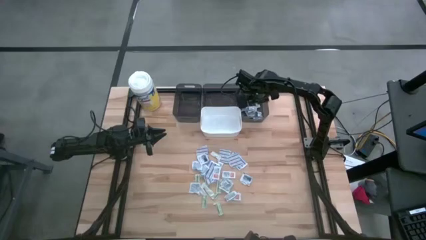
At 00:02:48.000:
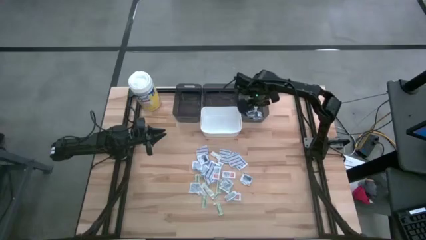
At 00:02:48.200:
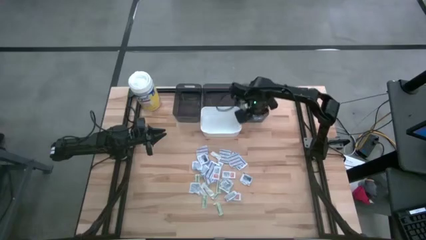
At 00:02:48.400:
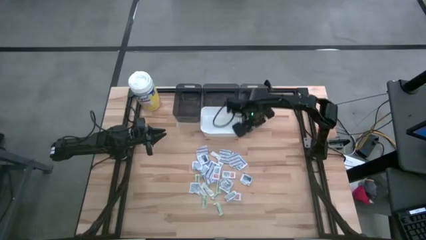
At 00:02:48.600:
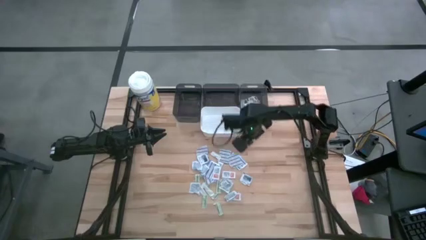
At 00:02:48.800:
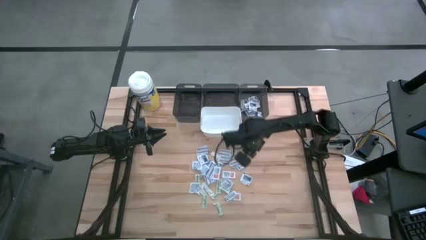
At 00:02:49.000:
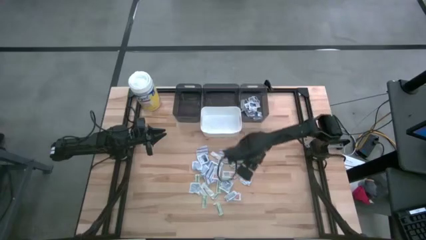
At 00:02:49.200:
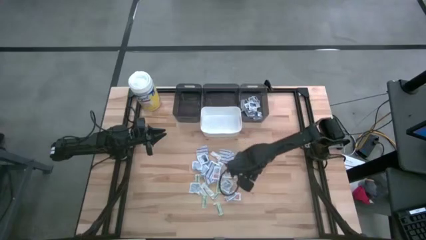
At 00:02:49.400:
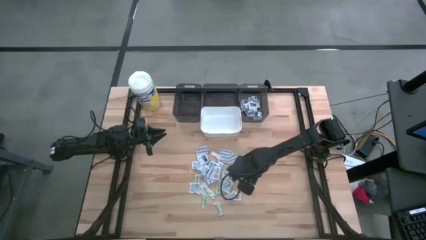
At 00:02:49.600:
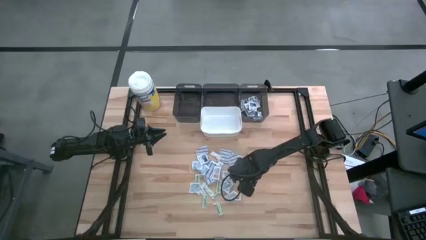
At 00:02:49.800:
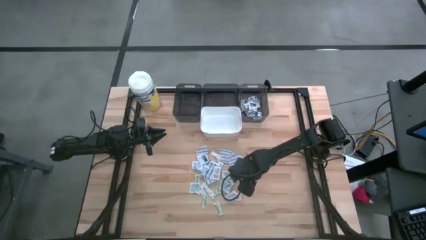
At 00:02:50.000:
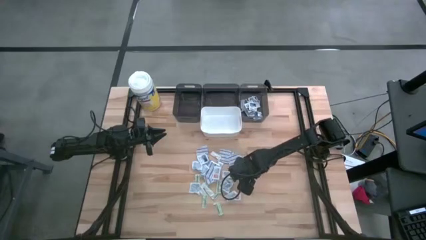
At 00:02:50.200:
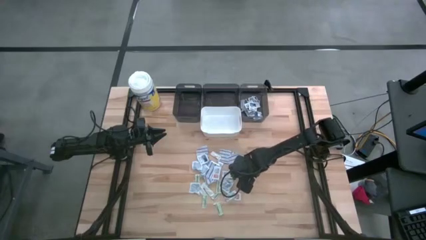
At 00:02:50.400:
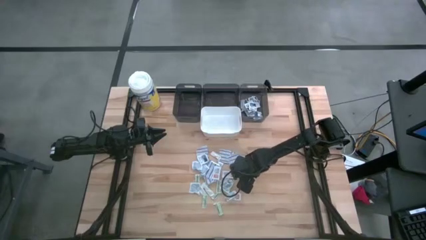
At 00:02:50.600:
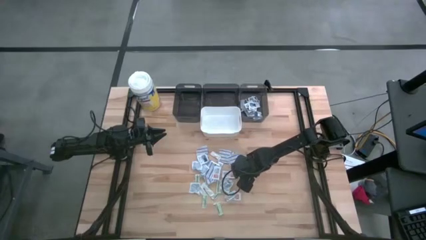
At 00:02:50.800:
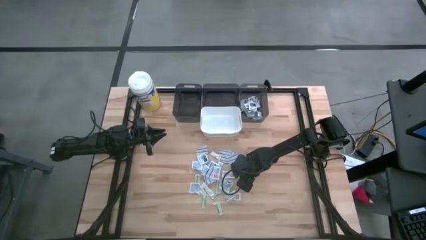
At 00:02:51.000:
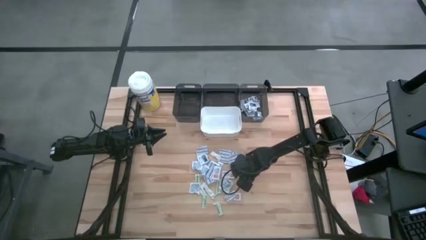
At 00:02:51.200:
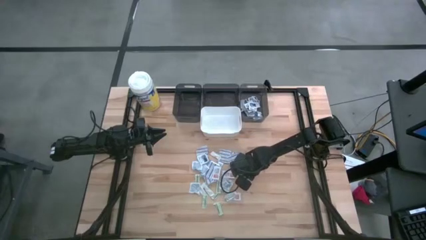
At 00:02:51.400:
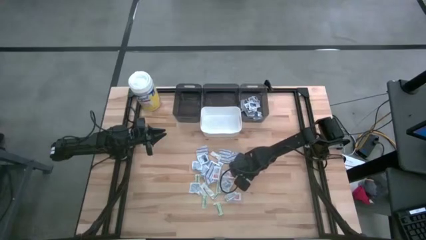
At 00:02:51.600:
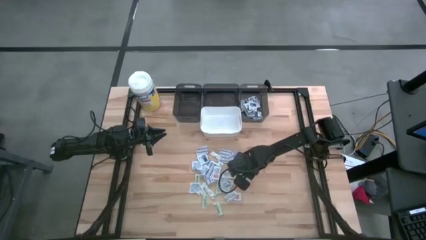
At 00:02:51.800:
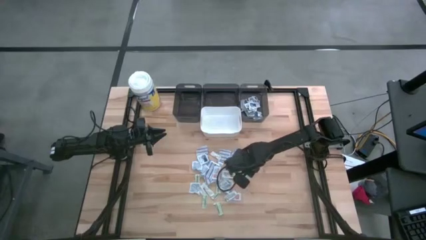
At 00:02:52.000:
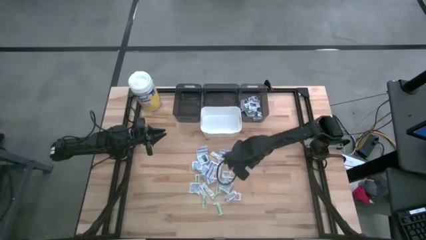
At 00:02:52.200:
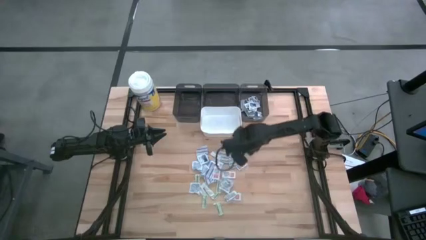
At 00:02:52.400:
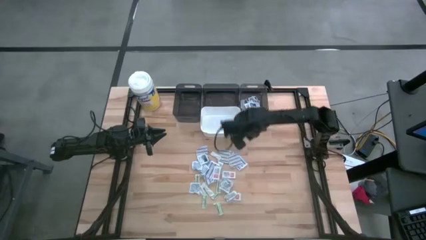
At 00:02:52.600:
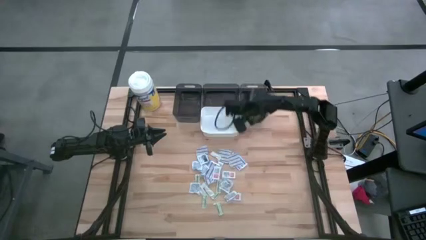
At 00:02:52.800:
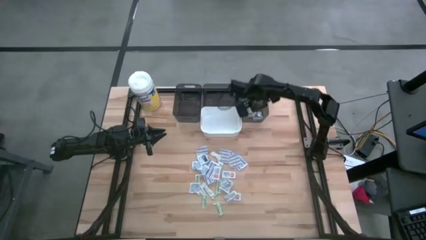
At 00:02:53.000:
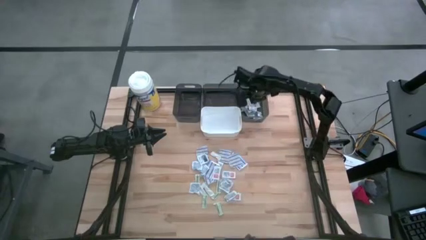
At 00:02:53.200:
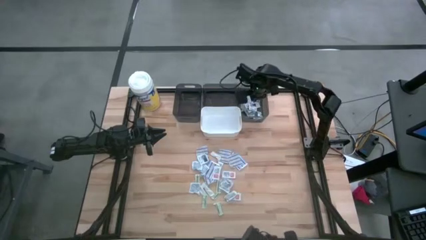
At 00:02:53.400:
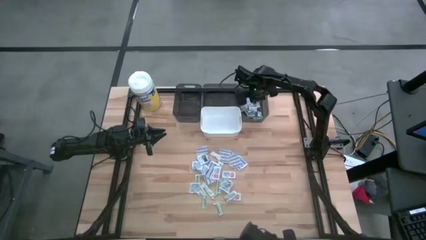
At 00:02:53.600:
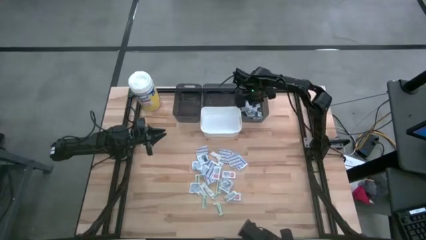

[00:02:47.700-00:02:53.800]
Task: Pick & Place First Aid Supplies
Put the blue alcohol pad into the right black bin

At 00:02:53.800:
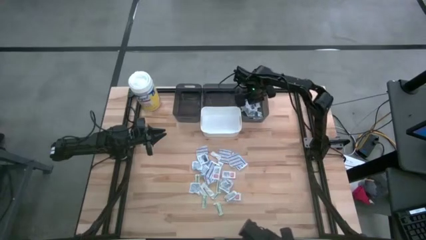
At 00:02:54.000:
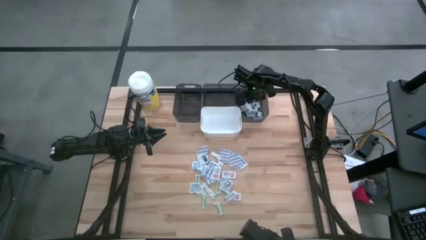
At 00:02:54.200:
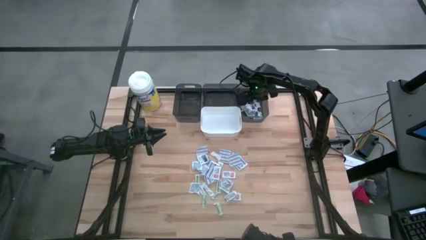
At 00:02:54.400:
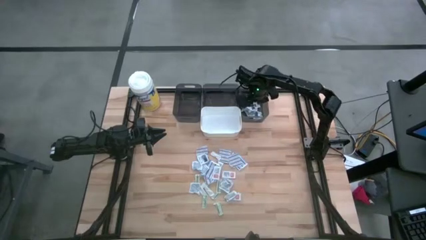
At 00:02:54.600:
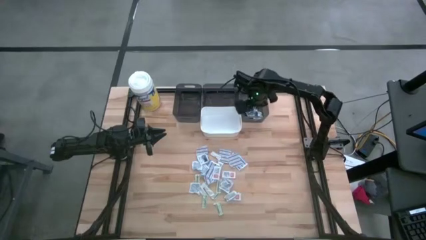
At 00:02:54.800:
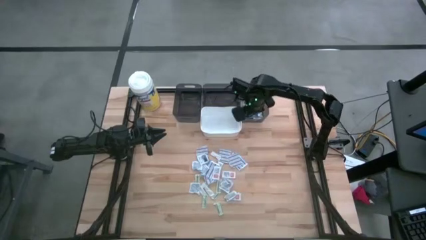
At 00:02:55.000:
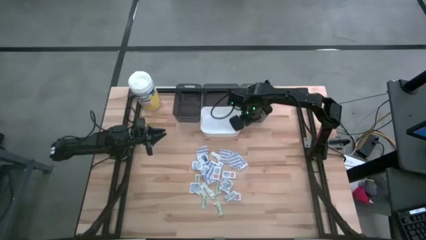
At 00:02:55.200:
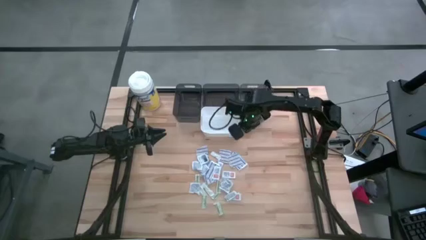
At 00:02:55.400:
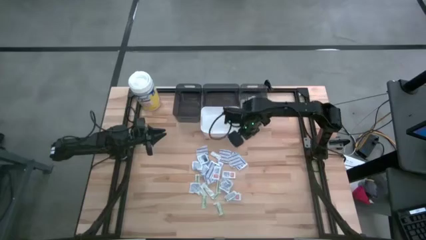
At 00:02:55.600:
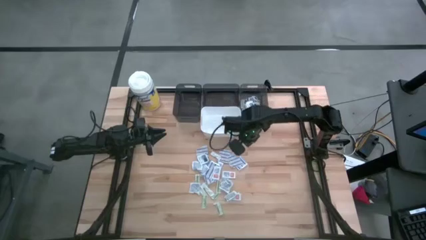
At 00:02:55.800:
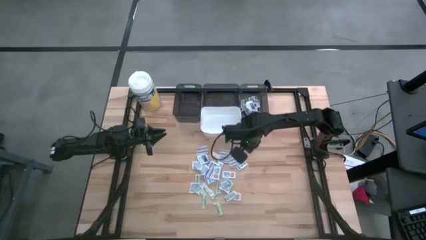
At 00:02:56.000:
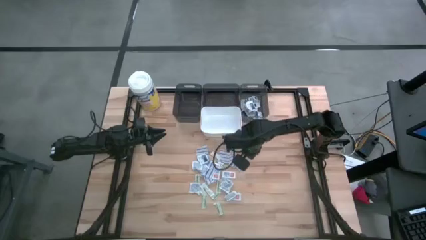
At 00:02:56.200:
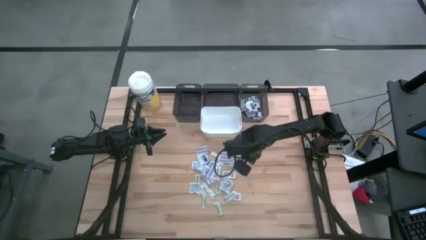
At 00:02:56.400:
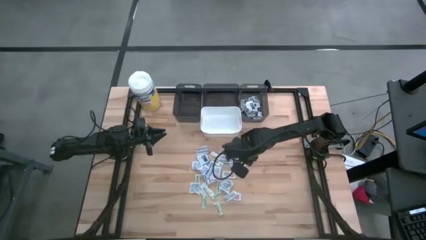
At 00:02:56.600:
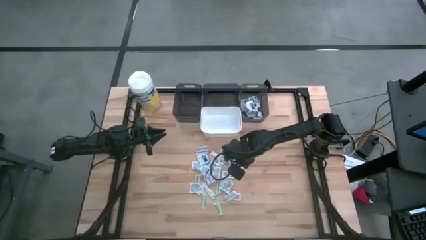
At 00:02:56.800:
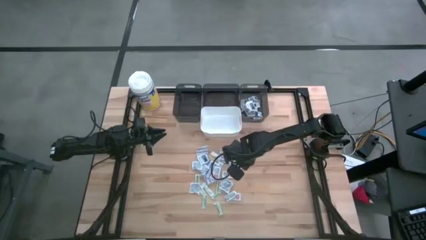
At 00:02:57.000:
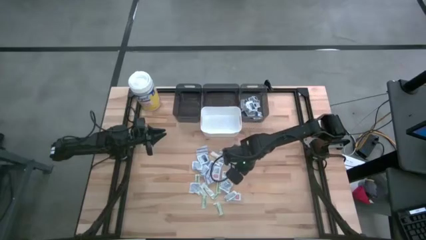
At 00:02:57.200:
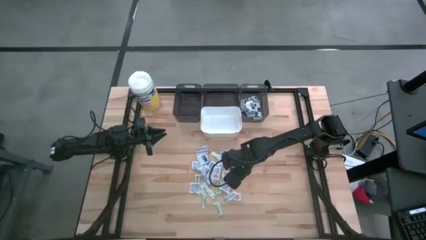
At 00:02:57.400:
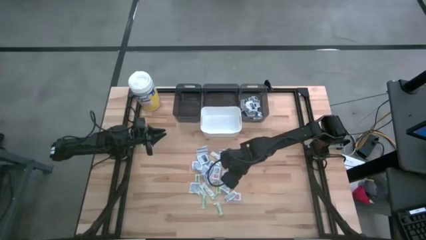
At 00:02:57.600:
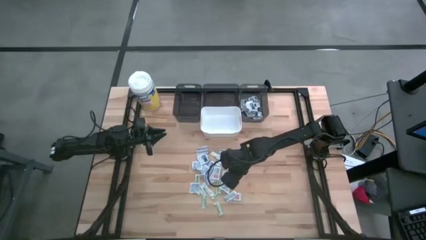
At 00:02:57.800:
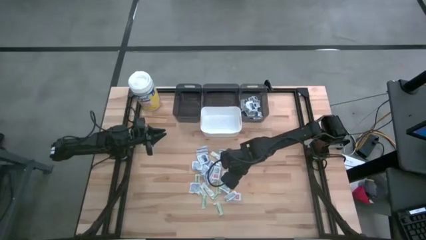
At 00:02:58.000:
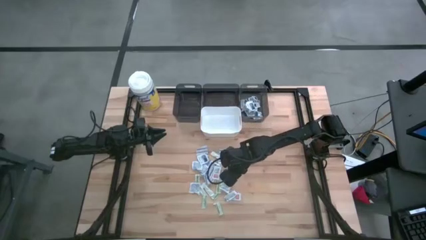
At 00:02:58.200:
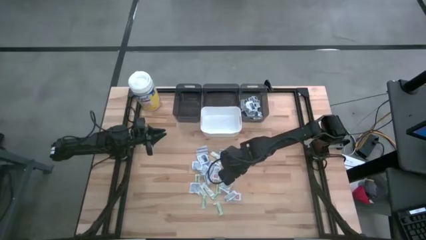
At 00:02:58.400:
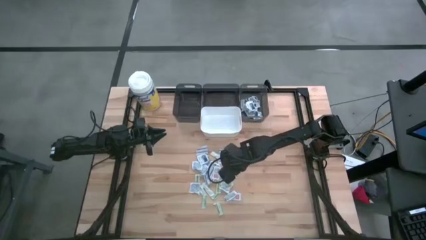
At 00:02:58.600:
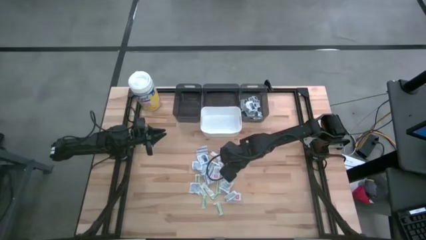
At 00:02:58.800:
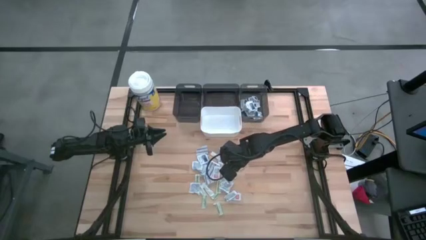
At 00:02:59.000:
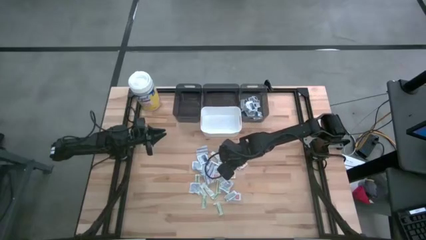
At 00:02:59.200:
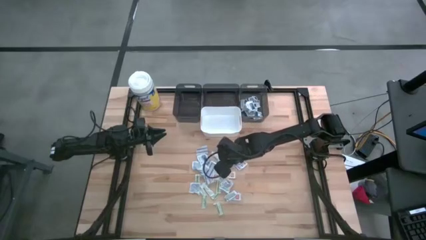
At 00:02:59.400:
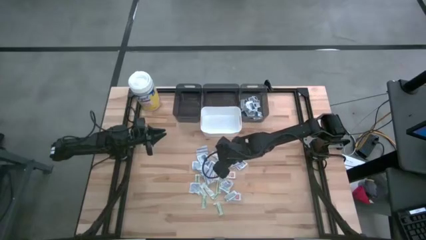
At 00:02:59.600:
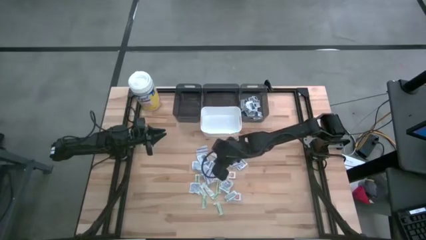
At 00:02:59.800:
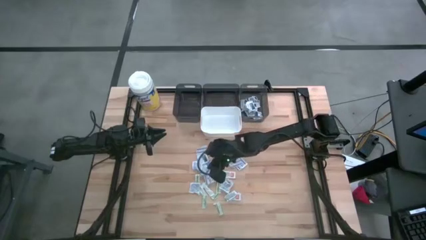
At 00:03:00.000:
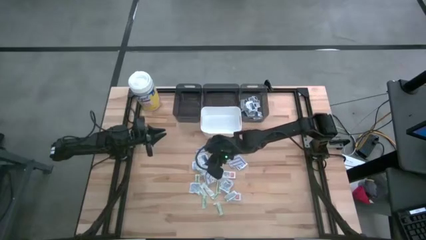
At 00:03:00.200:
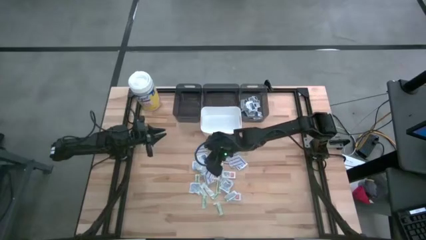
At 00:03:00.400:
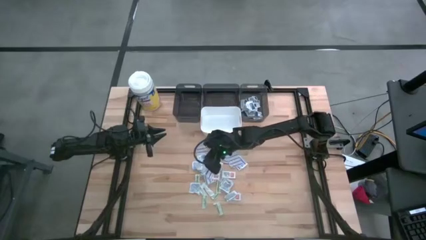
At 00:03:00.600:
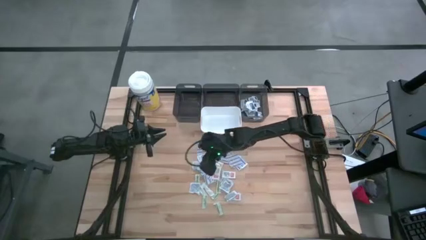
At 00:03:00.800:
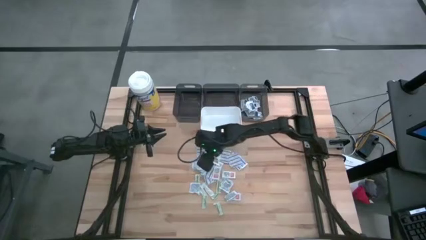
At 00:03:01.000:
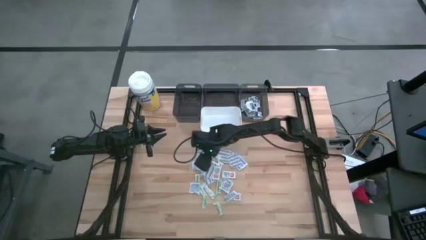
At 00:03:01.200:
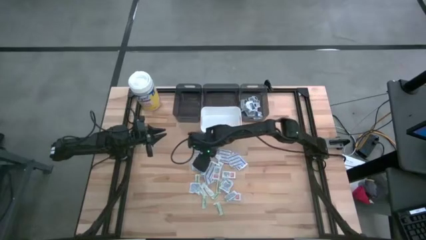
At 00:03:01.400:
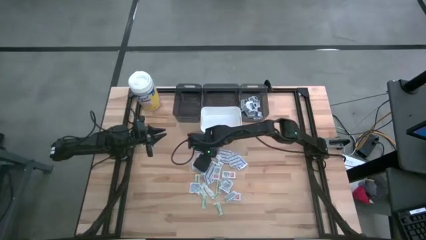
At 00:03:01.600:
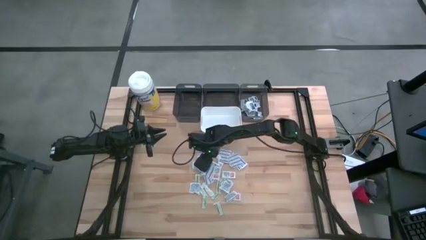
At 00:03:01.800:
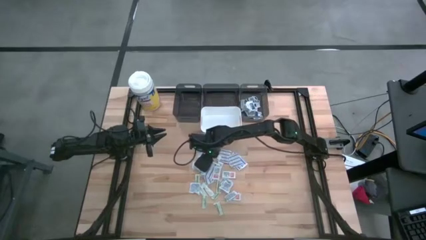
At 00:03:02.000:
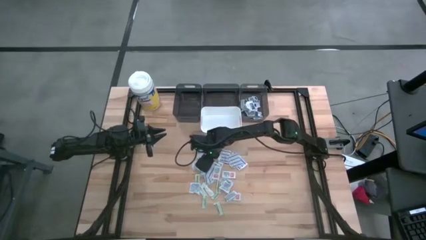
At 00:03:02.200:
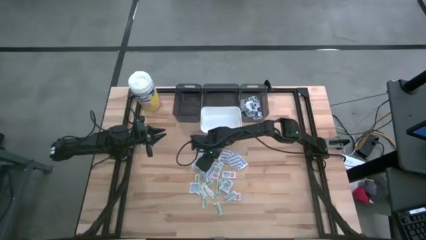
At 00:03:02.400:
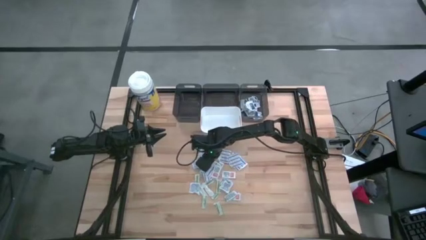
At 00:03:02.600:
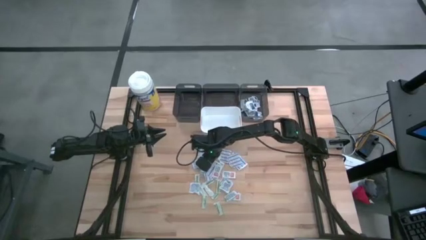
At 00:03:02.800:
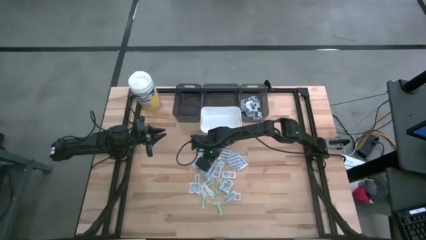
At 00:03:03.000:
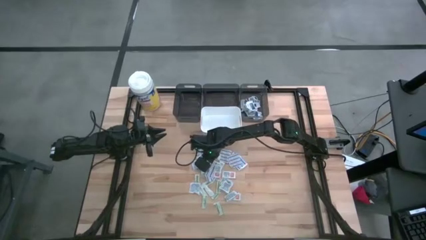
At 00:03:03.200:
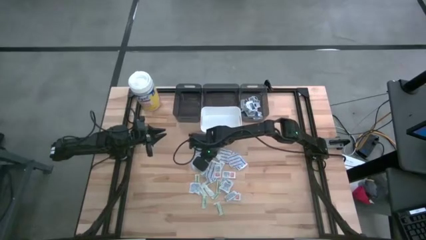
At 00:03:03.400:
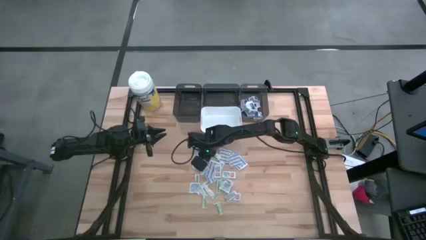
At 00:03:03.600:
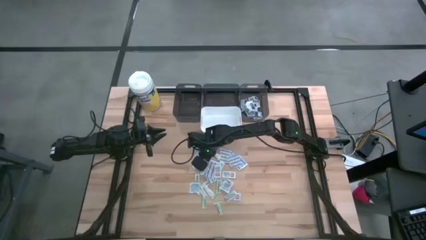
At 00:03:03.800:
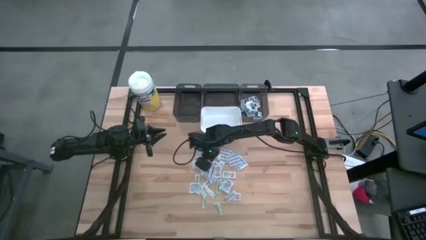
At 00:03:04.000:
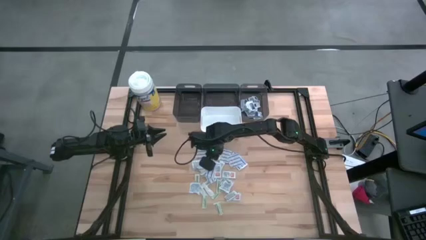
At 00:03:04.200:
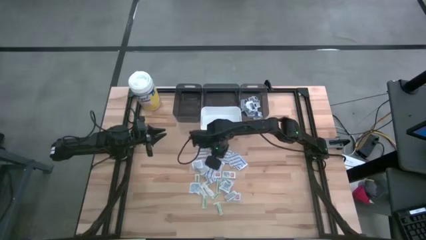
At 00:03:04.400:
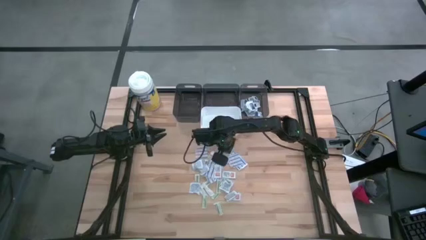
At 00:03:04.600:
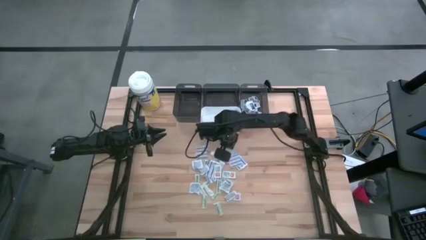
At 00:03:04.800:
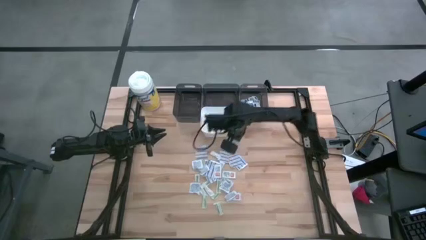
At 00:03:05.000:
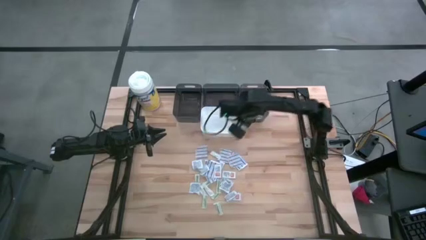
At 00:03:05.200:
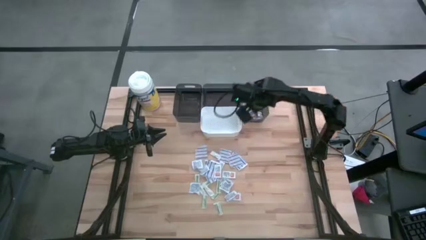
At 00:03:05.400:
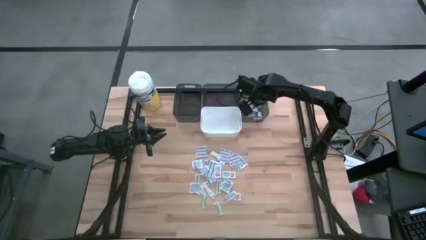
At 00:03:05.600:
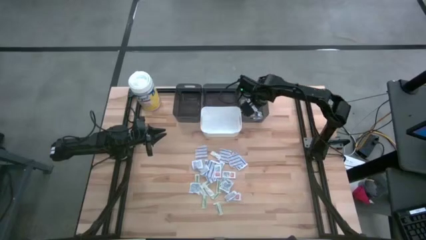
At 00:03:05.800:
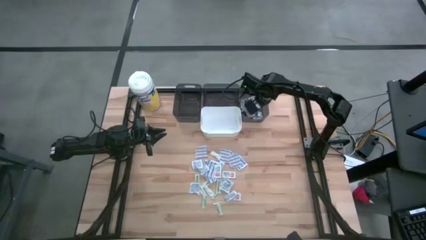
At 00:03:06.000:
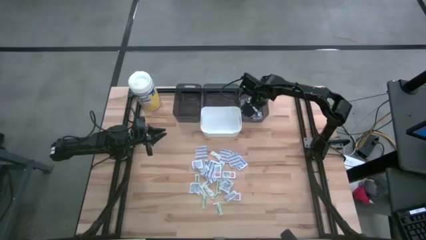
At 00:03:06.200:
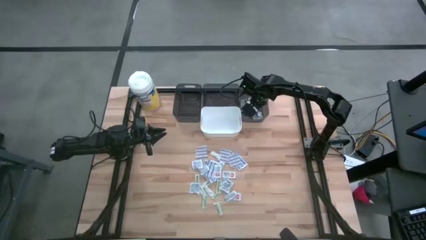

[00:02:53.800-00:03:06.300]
Put the blue alcohol pad into the right black bin
